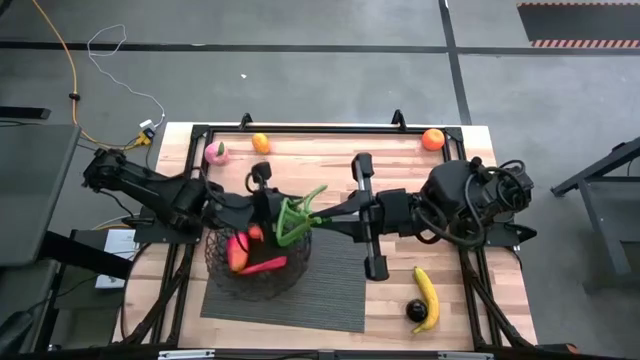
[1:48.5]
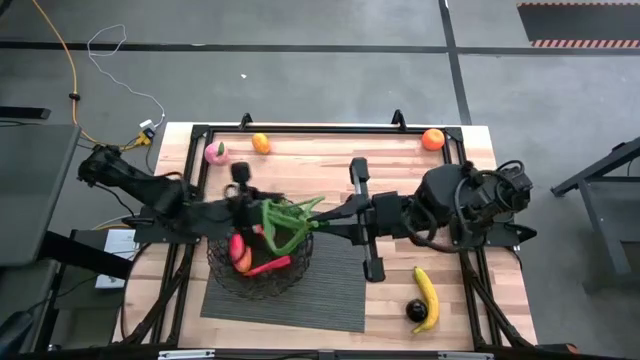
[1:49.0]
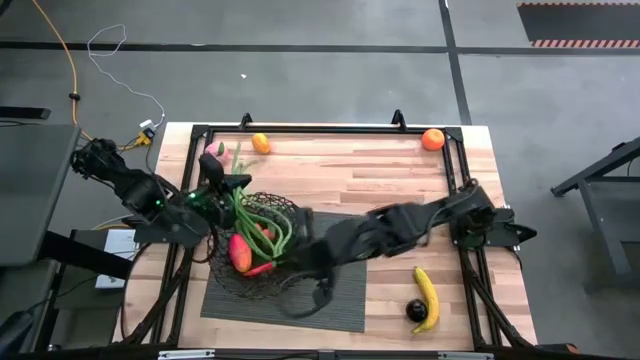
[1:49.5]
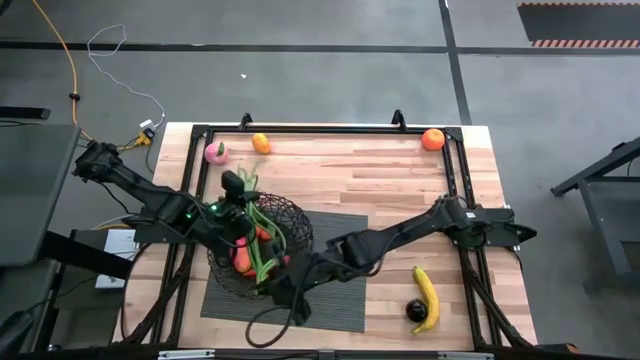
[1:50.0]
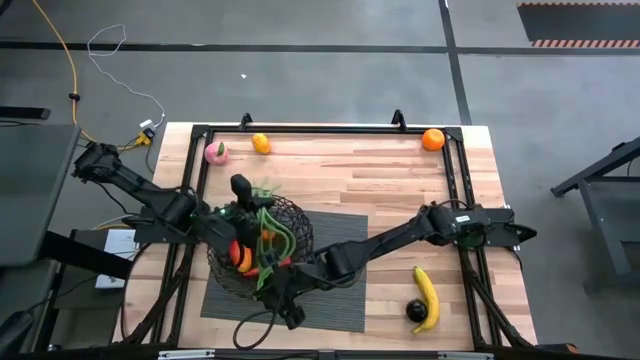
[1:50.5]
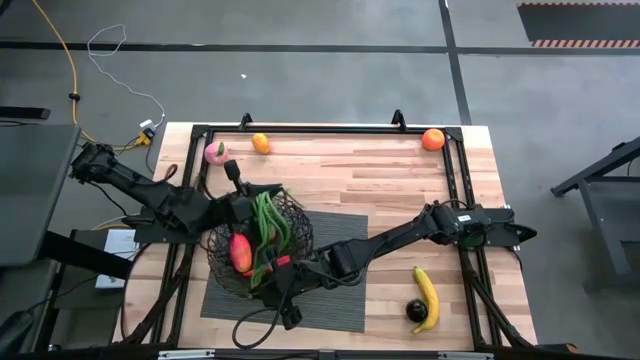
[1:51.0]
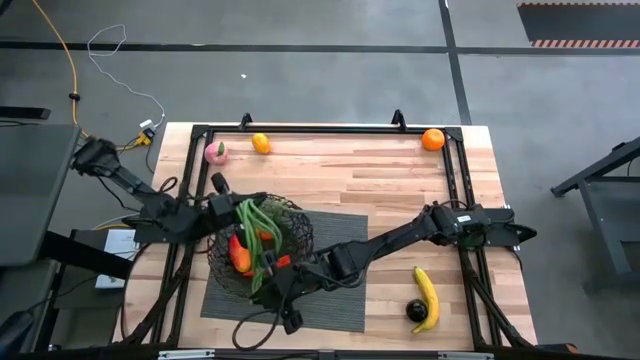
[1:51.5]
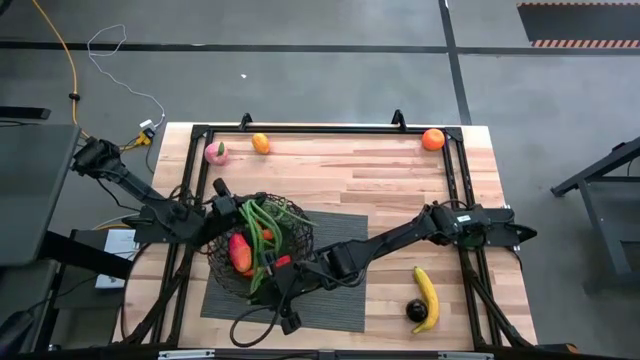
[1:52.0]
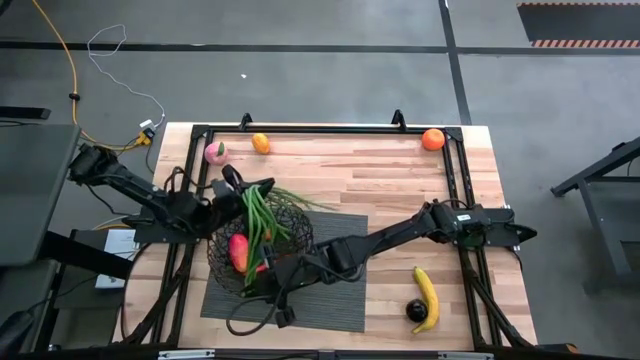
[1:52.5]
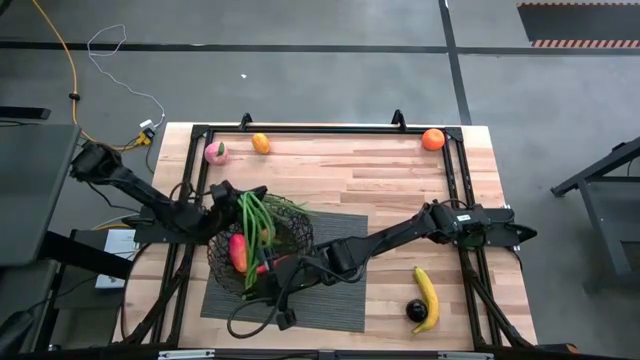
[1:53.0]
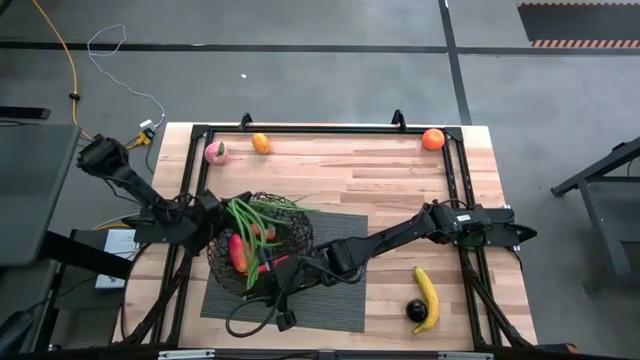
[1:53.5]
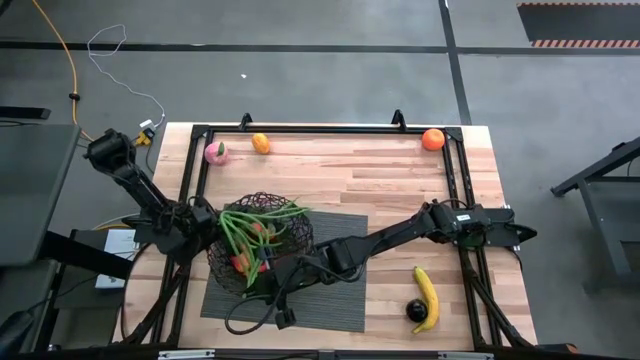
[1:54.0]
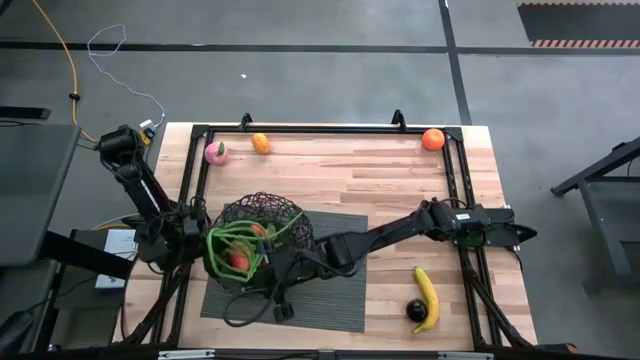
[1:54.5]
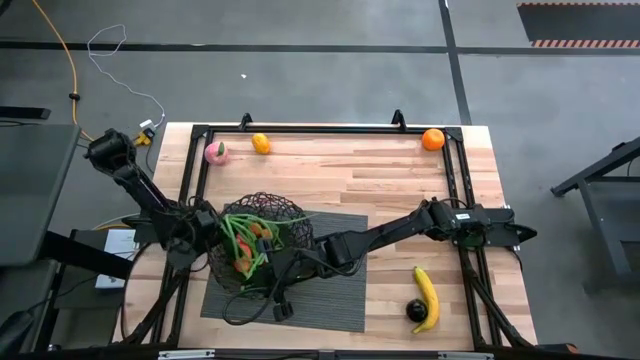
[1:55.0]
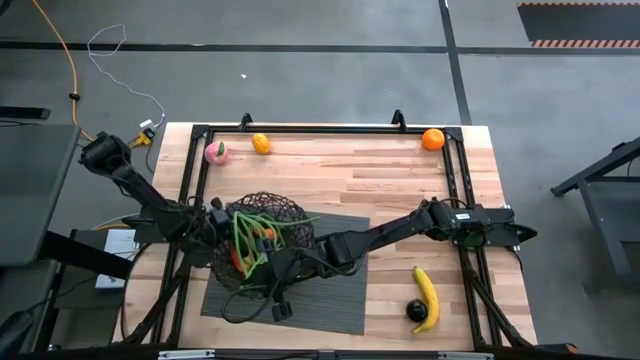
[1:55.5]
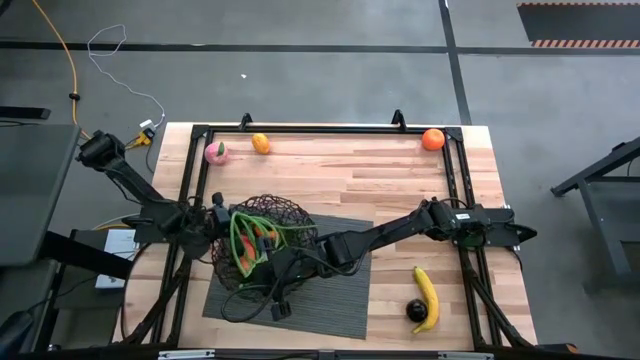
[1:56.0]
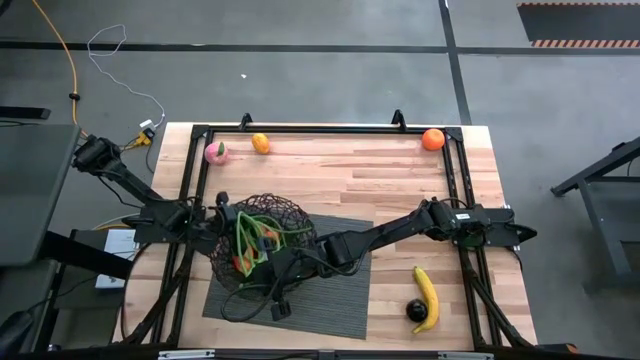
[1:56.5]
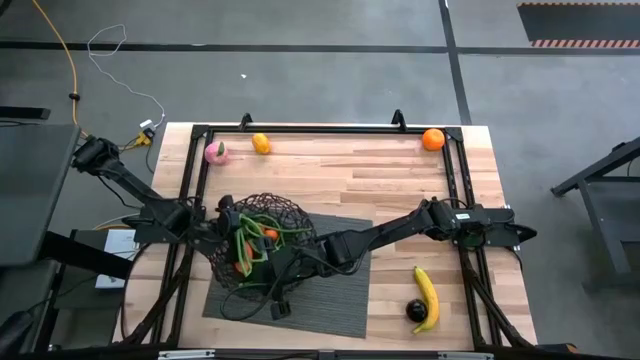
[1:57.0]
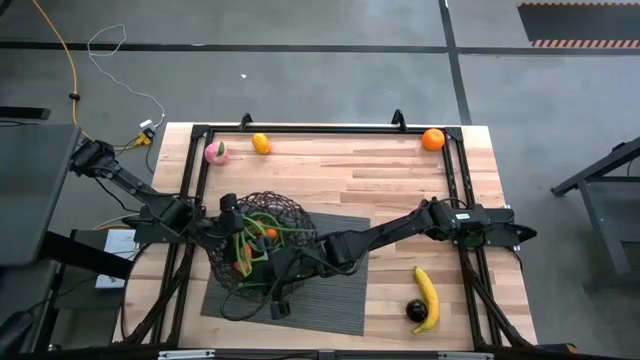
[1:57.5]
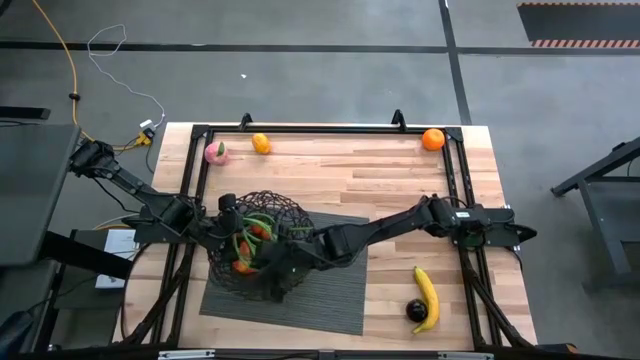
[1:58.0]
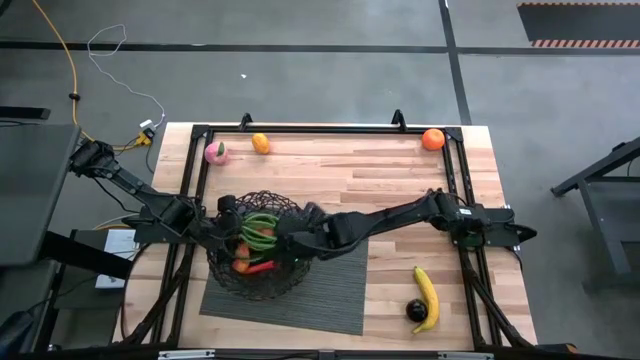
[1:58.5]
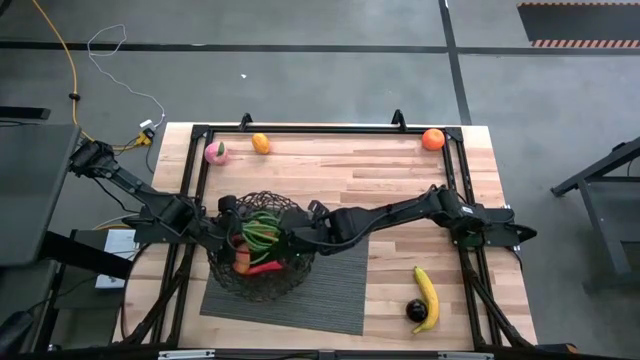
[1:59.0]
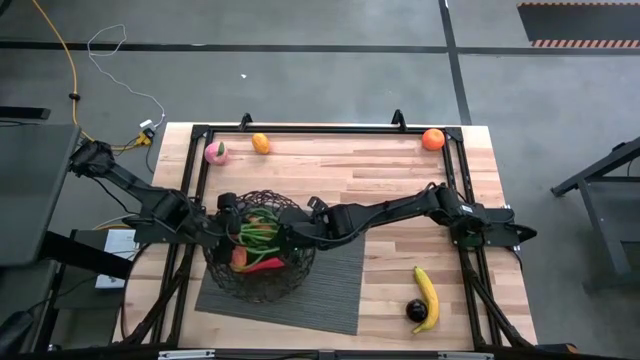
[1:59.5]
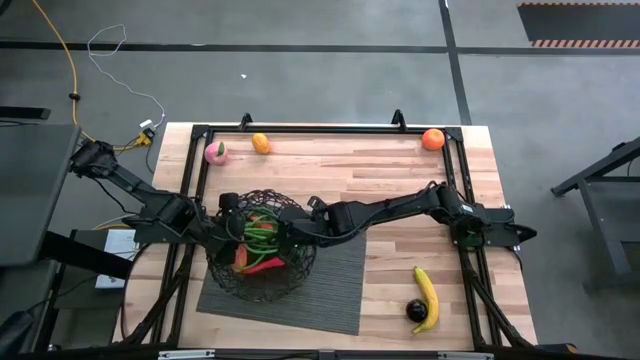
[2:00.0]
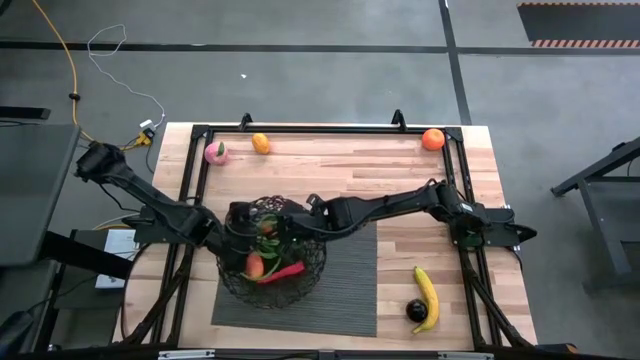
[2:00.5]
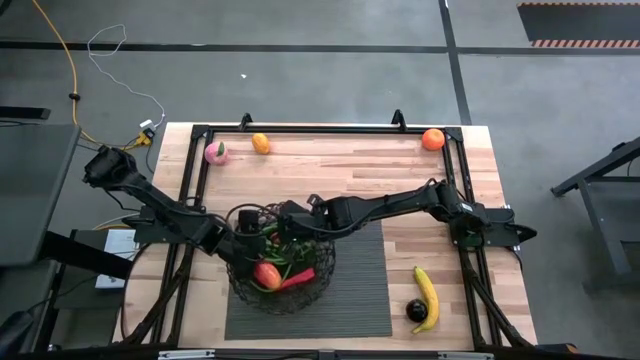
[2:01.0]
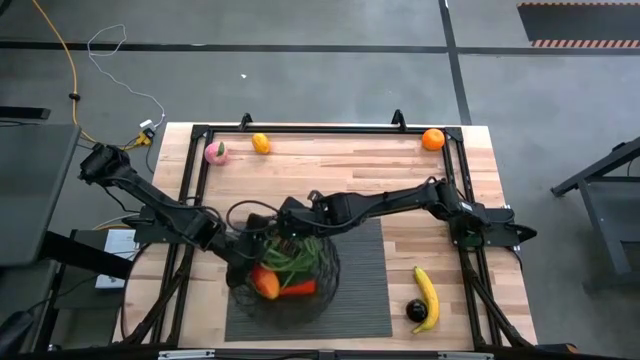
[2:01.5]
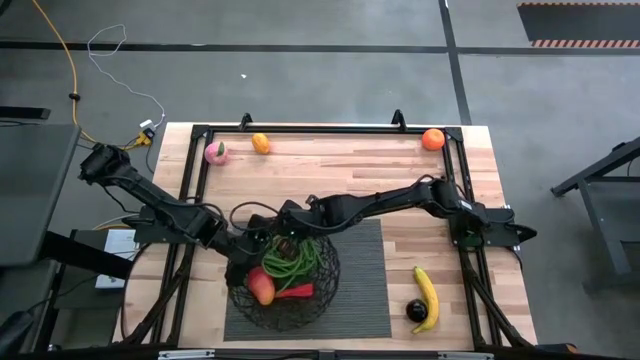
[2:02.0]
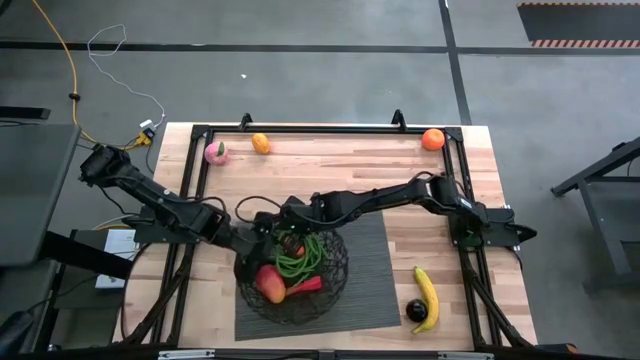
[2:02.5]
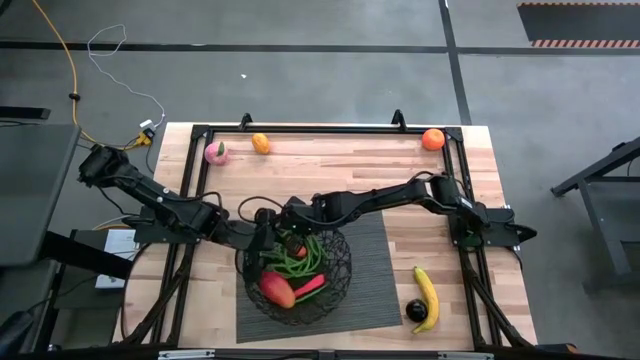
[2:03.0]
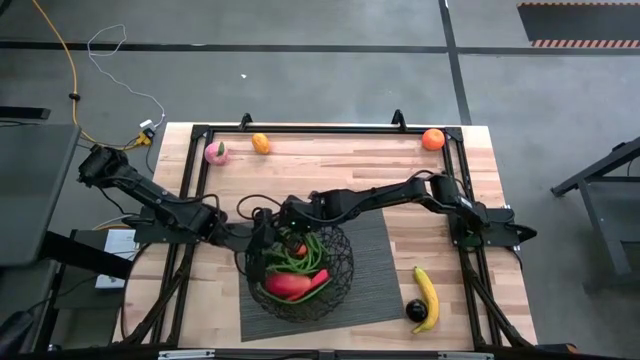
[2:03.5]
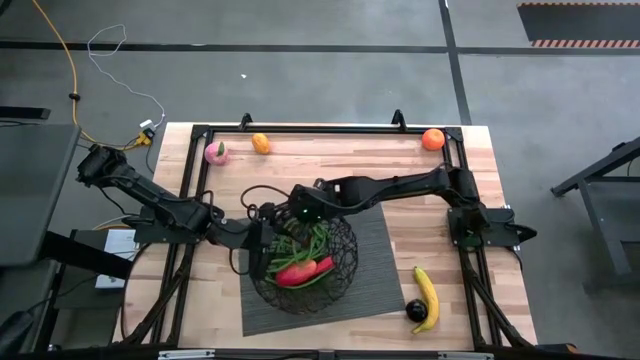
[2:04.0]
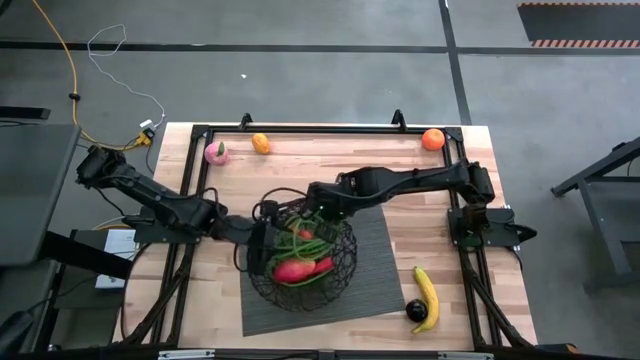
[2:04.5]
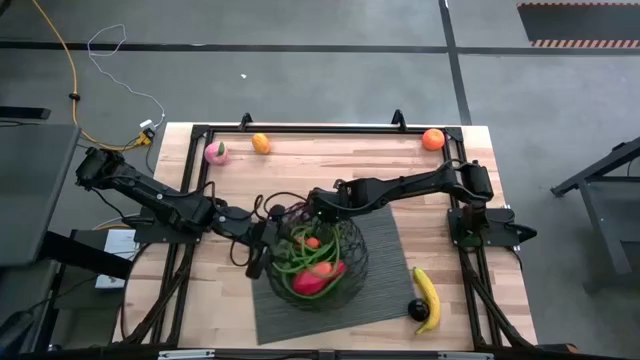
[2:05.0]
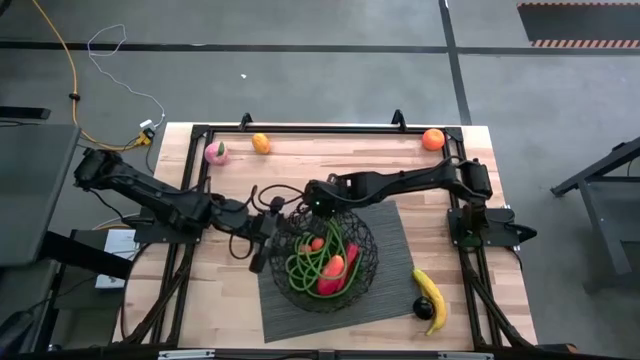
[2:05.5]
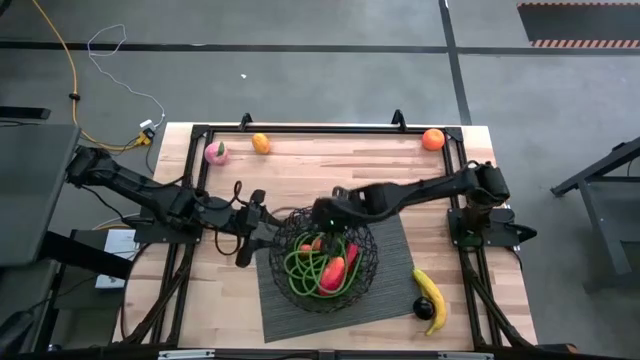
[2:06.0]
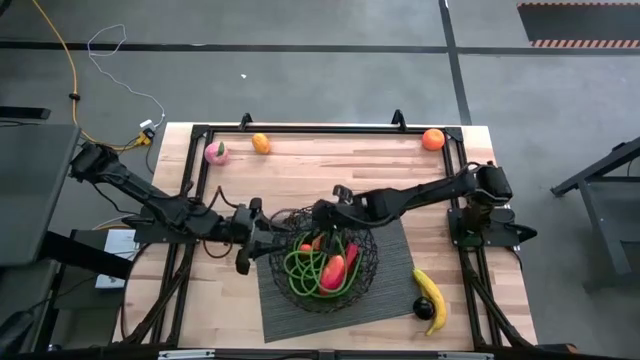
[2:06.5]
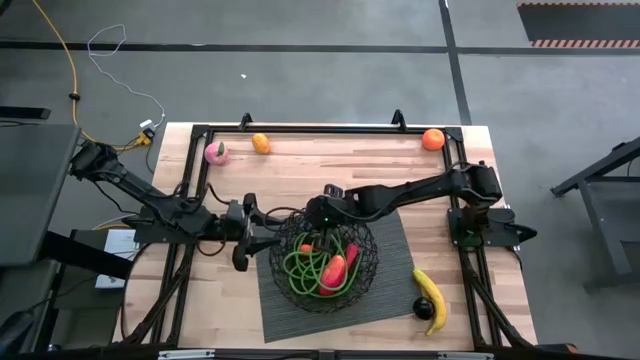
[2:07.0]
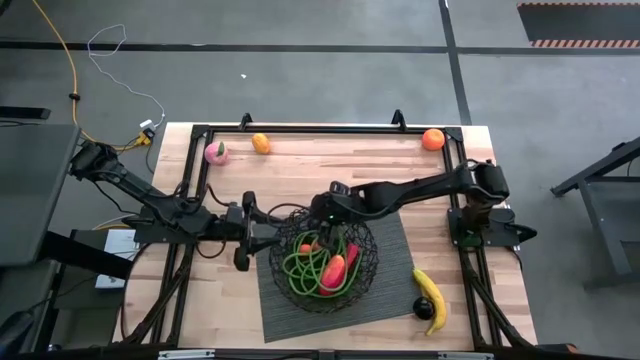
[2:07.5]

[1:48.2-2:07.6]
Task: Build produce basket
Put the green string beans into the black wire basket

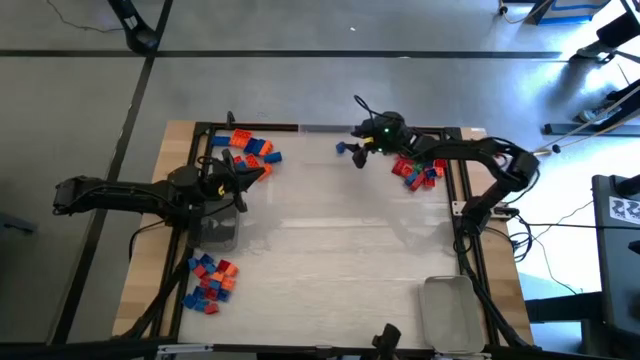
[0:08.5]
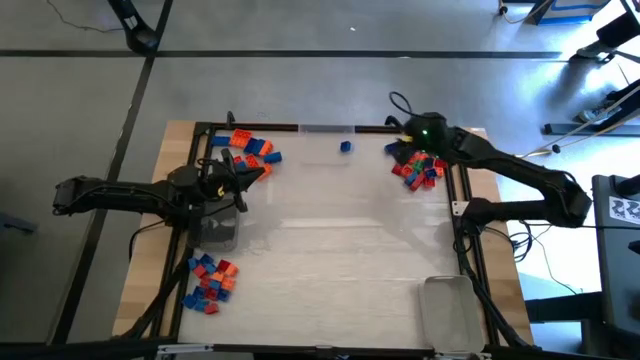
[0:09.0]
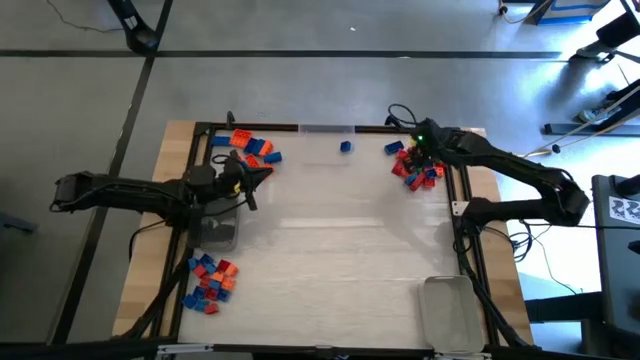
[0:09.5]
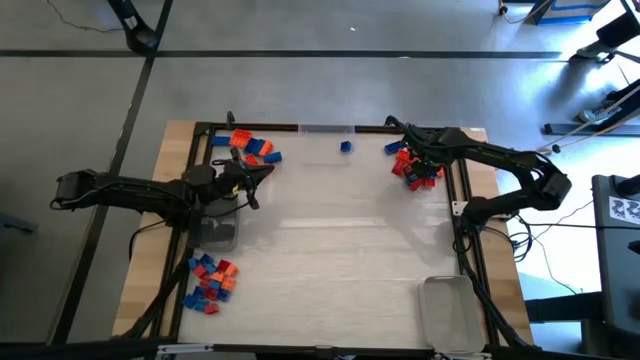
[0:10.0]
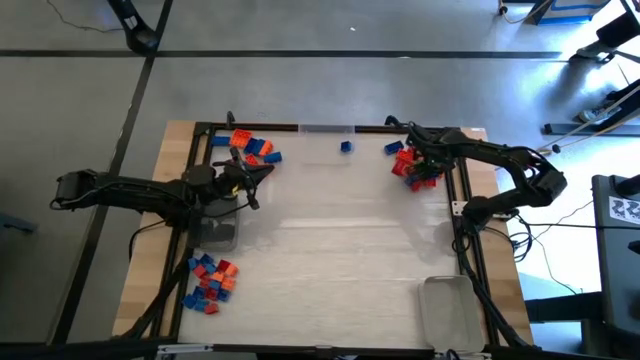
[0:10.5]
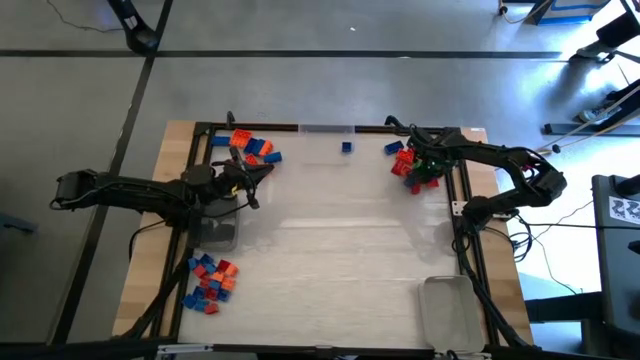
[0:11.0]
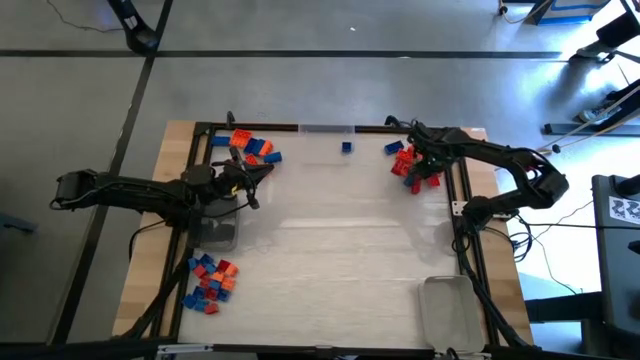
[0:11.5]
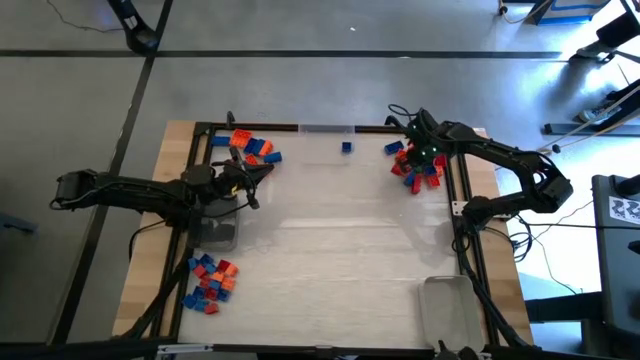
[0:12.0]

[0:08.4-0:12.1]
Task: Sort blocks by size
Put the blue 4 stud game piece into the transparent bin
